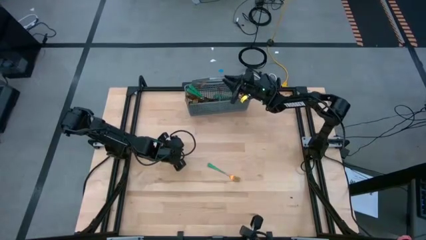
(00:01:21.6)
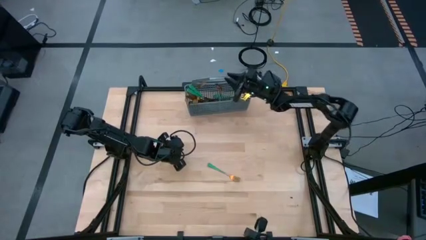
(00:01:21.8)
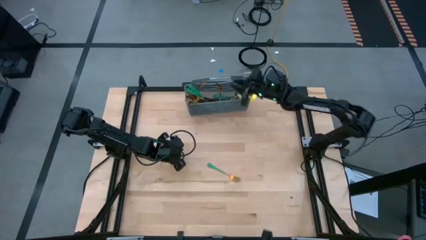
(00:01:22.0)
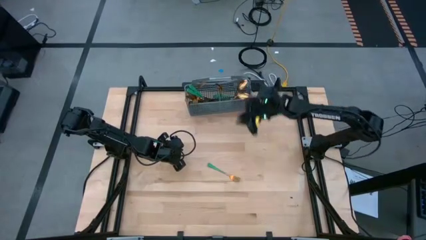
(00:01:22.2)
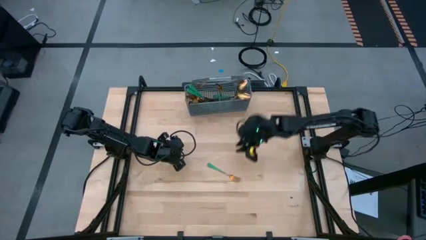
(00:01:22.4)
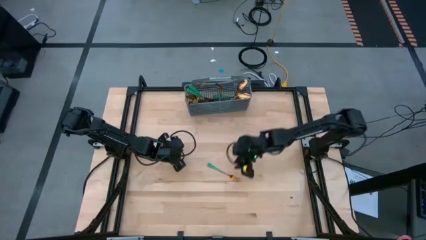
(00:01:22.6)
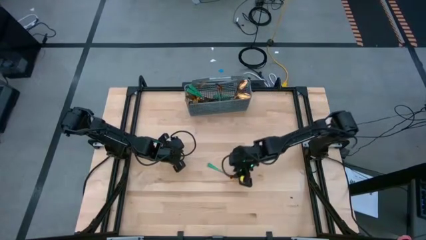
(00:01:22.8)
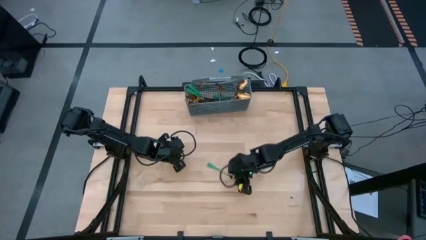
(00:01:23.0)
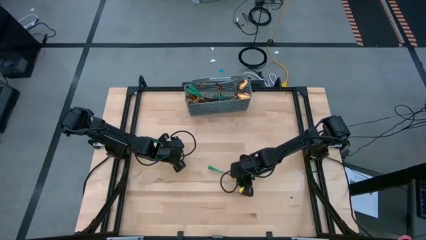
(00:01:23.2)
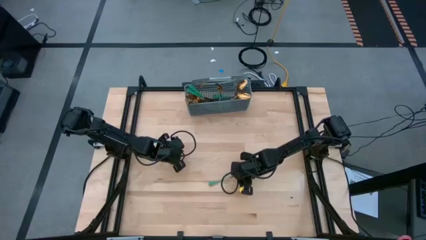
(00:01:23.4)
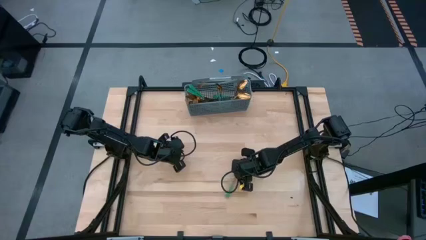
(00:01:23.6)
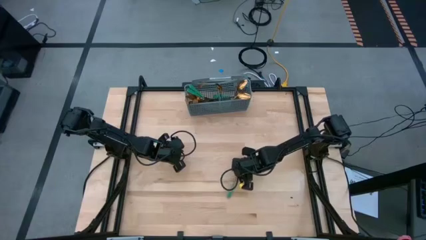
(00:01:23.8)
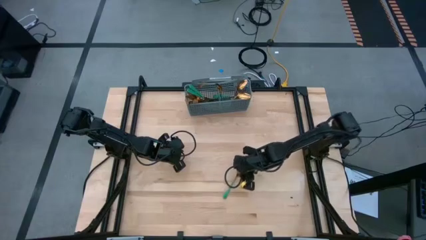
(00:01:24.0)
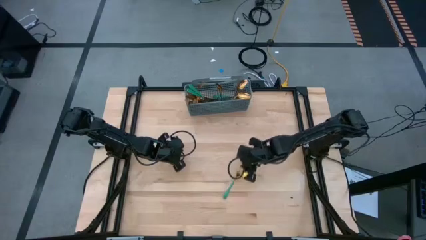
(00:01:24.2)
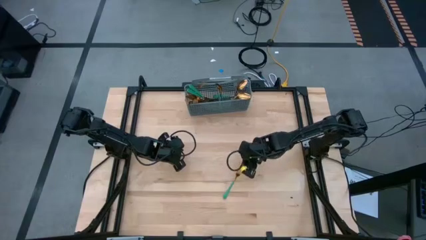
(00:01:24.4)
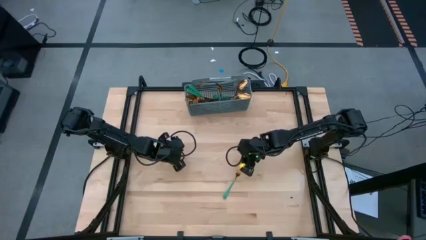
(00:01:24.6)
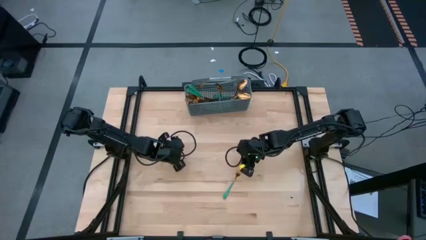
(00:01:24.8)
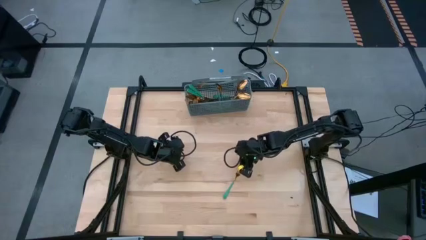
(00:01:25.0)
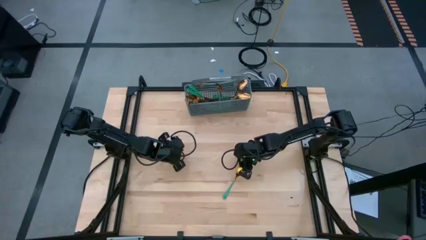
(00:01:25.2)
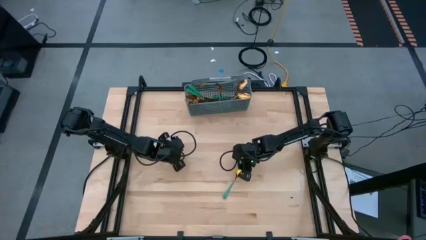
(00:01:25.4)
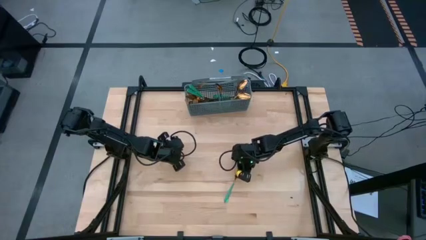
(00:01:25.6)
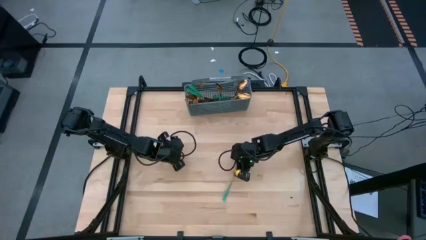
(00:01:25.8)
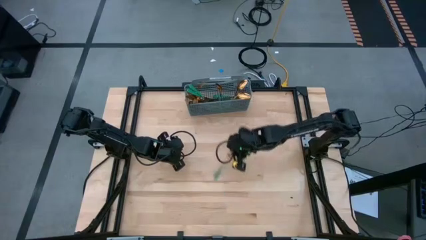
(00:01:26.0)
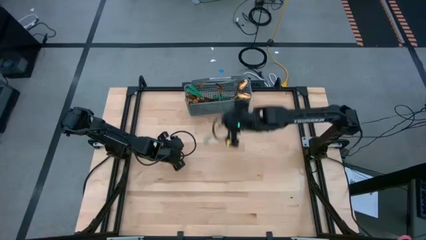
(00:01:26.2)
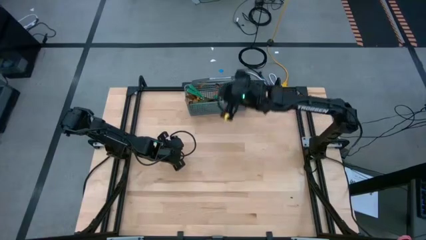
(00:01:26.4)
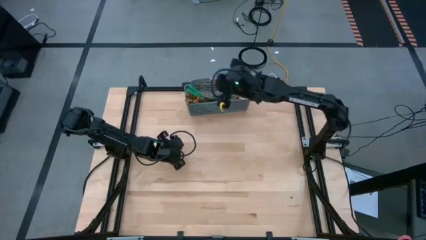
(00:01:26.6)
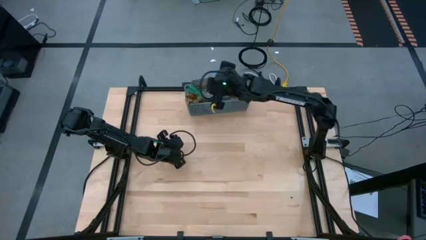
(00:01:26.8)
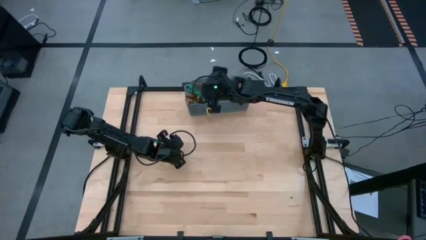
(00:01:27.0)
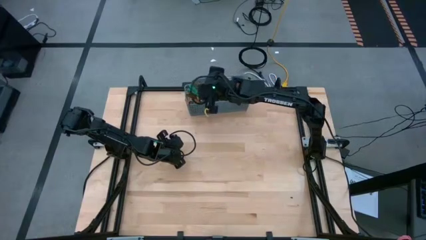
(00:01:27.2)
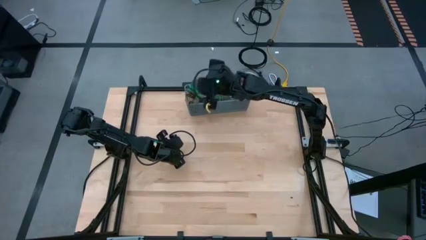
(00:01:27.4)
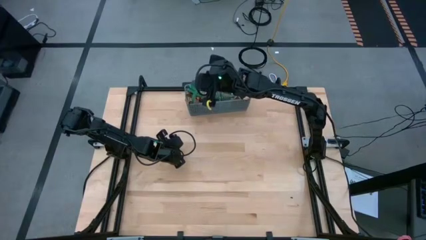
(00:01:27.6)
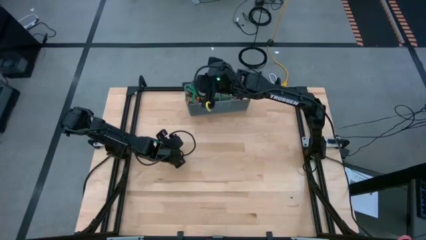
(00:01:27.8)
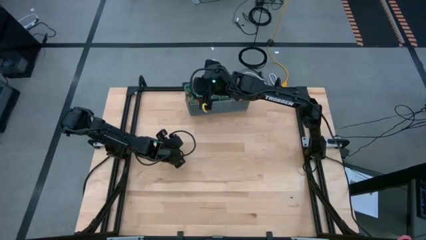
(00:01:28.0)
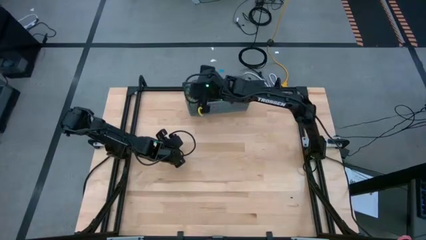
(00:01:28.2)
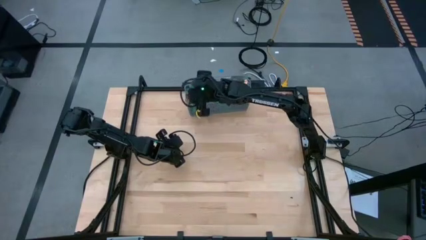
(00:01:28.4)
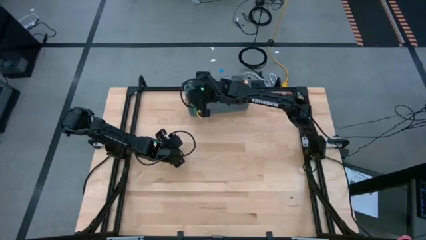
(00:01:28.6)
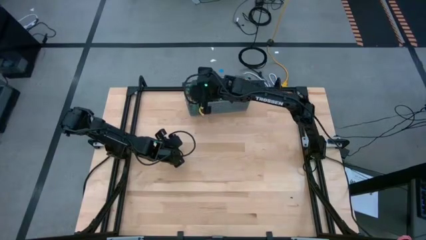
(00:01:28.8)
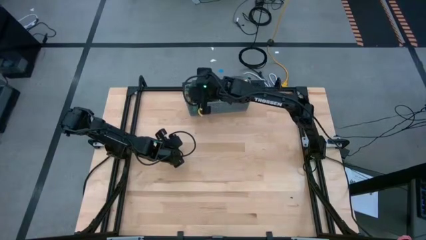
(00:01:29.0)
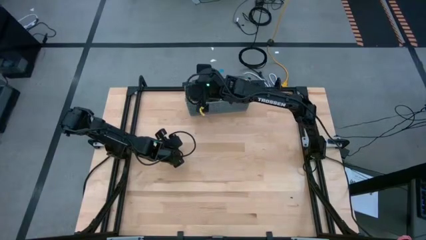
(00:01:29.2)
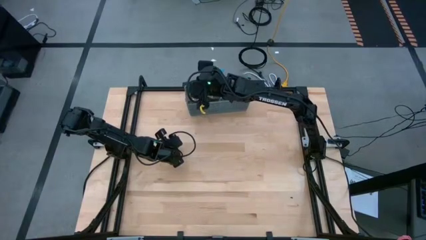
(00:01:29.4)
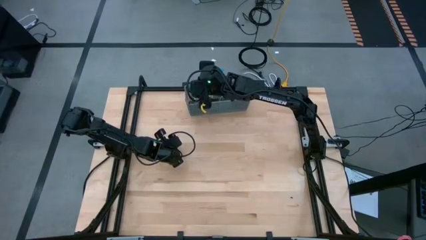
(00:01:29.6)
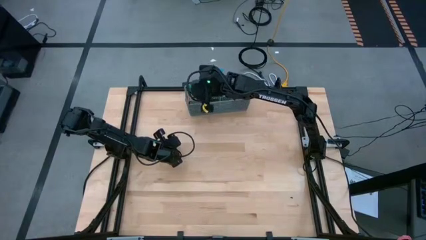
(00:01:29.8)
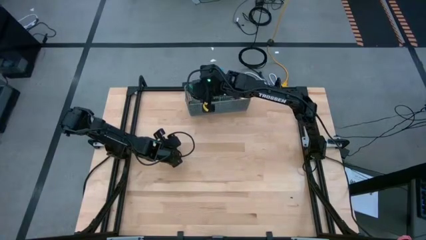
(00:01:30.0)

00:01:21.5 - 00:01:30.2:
Task: Sort silverware
Put the gold fork into the left section of the gray utensil holder

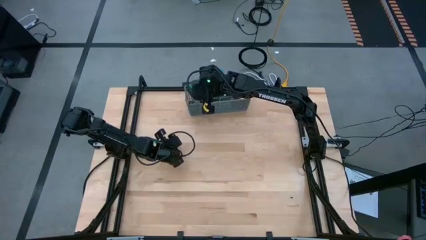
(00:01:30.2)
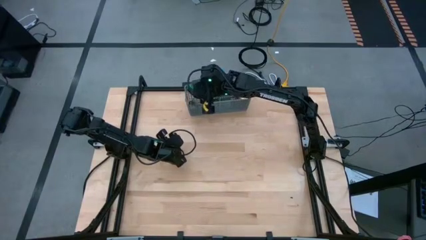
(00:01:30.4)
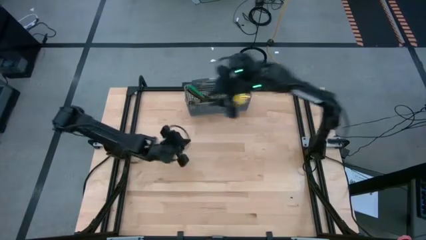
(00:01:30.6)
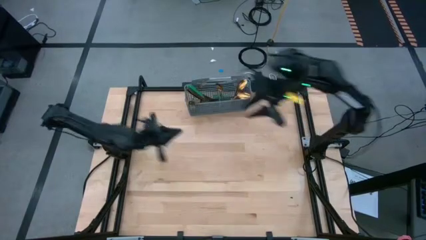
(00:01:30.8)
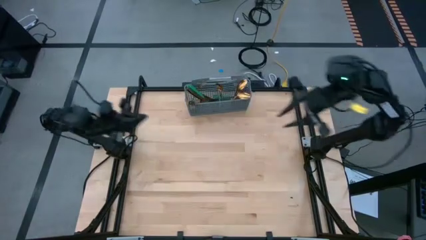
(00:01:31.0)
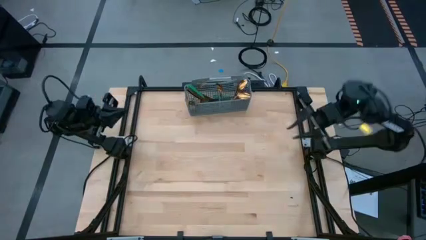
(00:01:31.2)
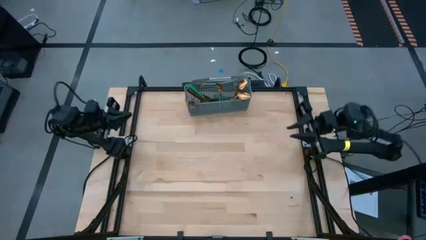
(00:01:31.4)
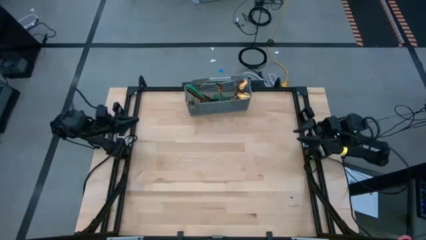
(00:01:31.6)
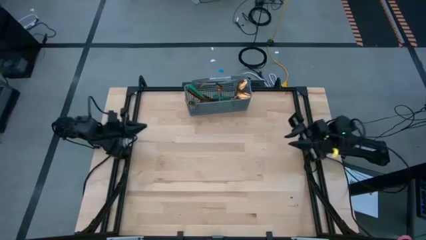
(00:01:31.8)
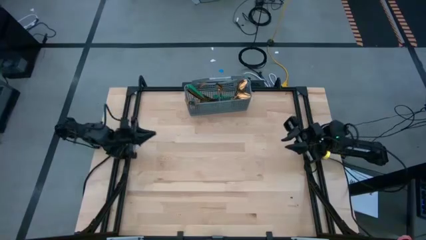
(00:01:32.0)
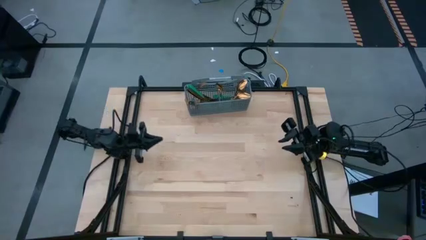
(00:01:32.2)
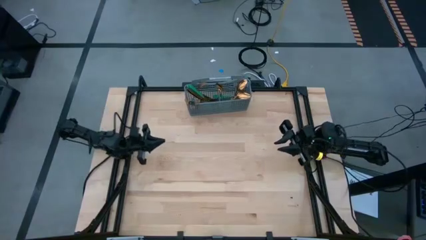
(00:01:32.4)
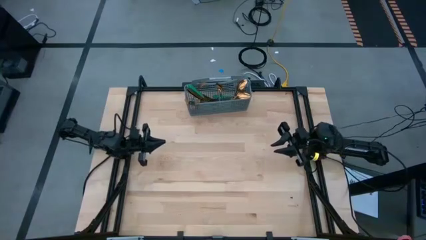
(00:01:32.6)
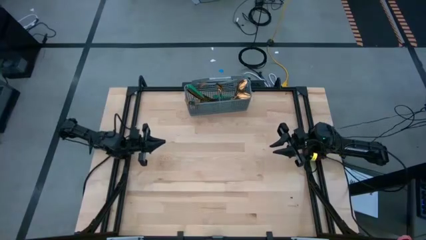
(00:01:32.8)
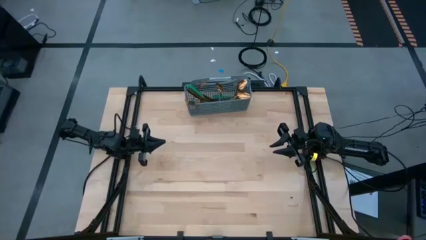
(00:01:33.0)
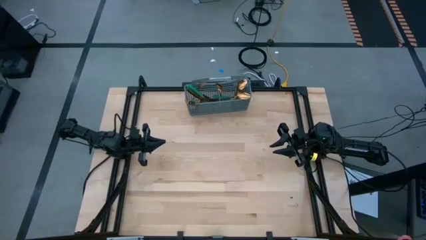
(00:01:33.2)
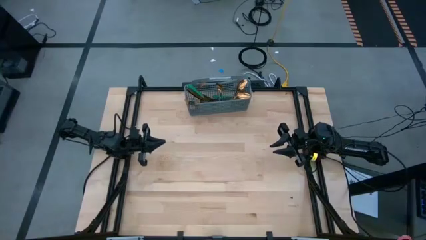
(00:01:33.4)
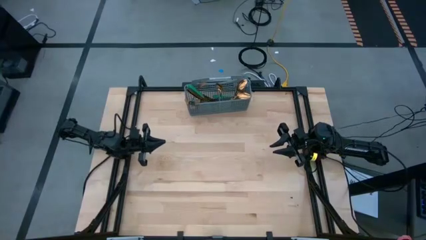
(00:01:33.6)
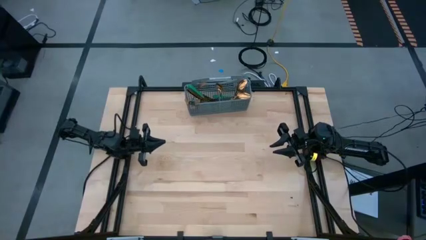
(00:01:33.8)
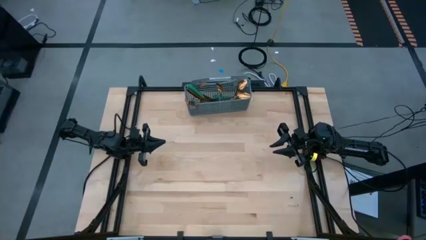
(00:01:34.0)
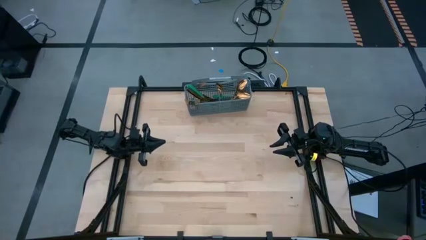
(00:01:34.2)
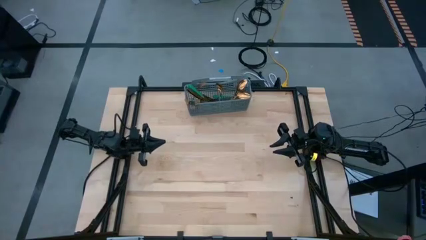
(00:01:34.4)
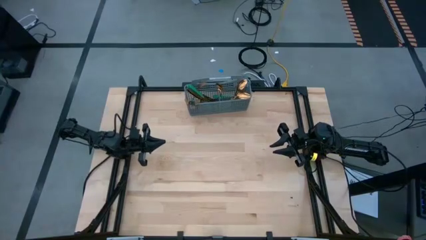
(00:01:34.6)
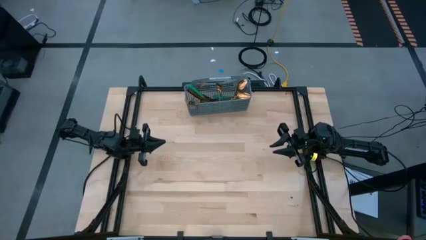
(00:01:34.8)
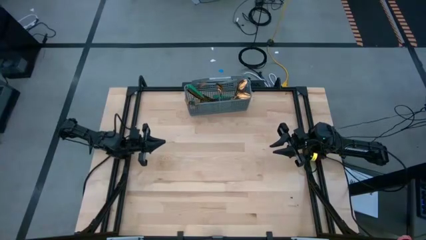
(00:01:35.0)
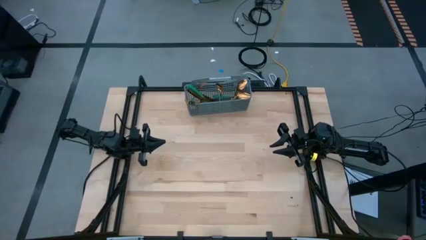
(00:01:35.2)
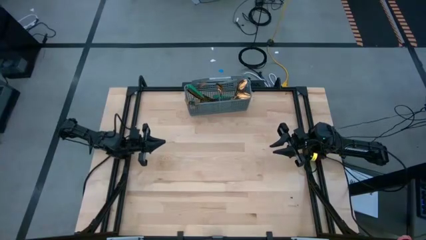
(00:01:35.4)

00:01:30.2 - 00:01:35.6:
Return to Home Position

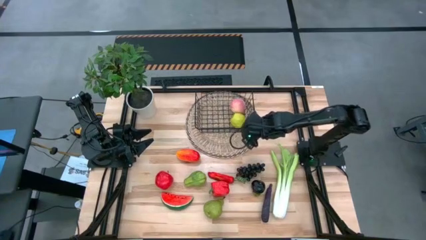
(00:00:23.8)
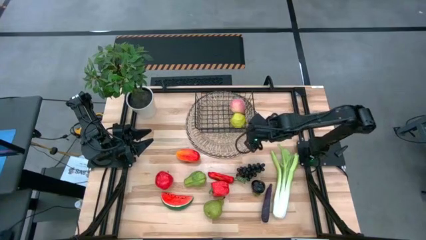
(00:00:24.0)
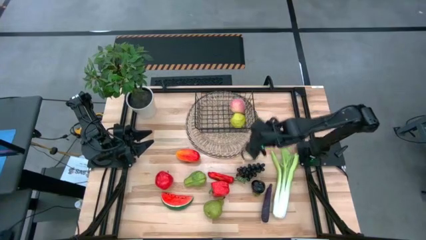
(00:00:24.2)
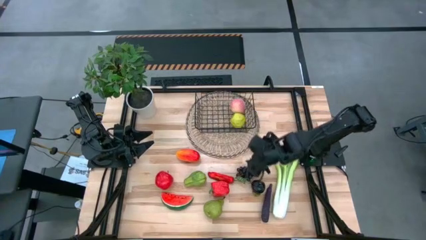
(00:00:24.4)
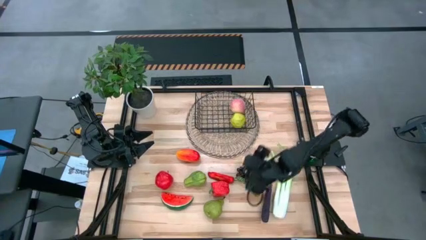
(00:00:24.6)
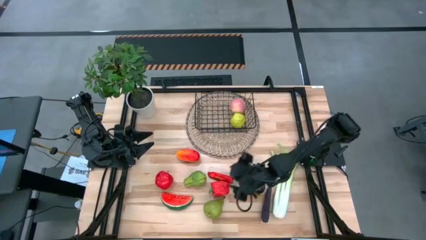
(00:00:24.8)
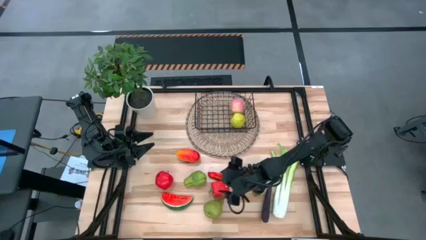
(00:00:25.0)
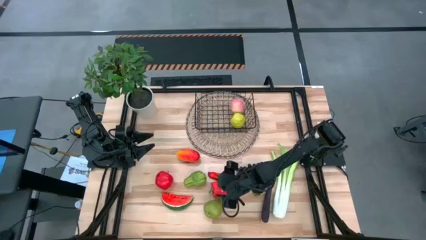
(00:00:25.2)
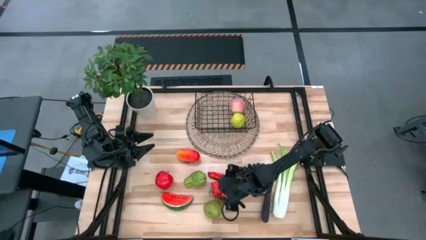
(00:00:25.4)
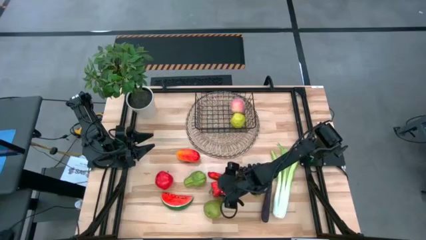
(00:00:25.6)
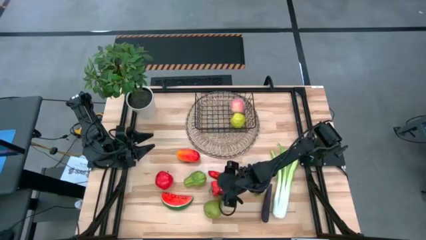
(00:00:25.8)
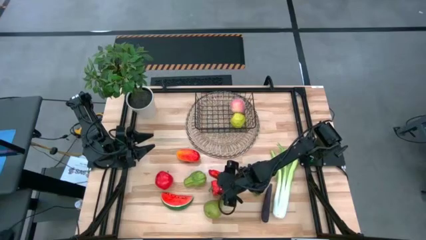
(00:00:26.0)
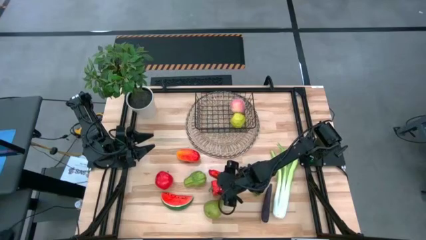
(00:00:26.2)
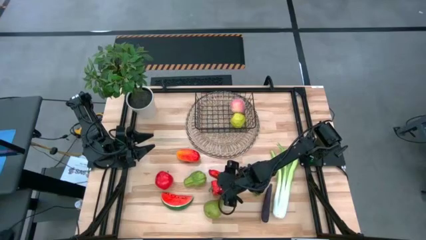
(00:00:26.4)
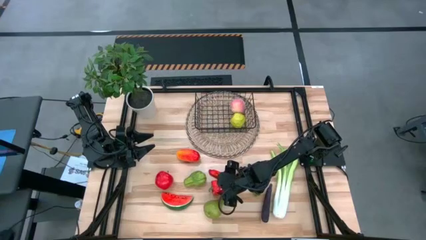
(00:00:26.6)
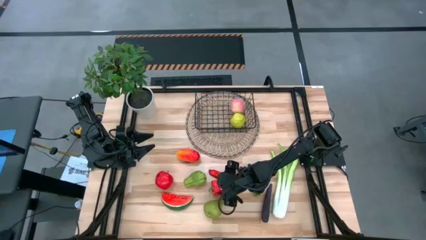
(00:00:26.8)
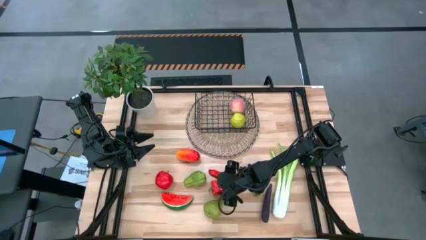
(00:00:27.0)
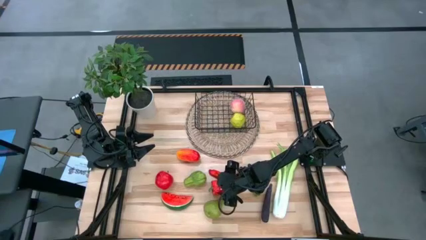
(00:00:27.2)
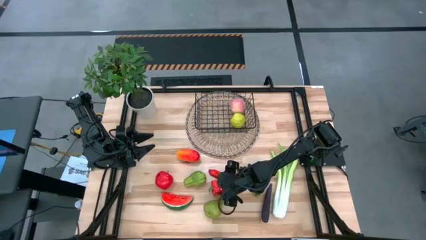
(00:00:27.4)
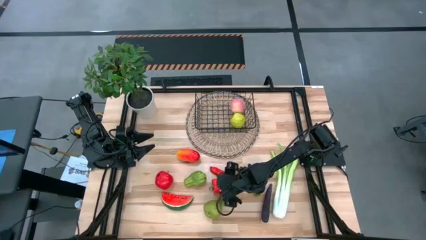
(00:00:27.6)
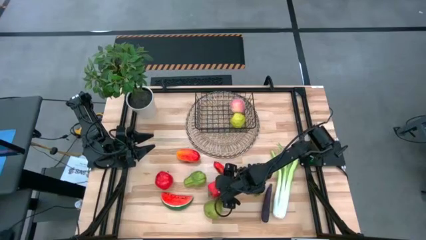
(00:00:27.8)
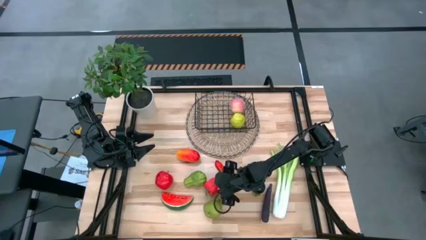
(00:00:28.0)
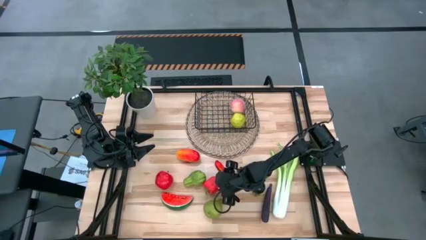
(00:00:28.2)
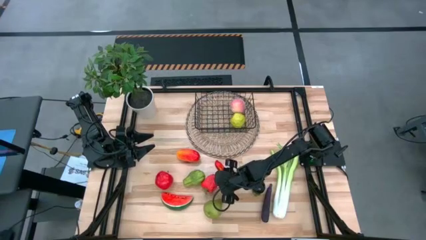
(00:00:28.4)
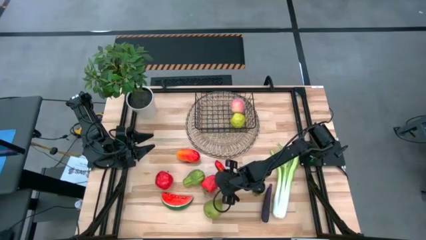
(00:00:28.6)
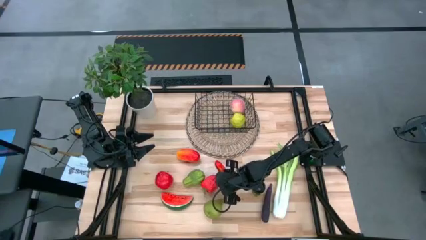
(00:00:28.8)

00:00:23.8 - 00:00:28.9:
Task: Build produce basket
Put the red bell pepper into the black wire basket
